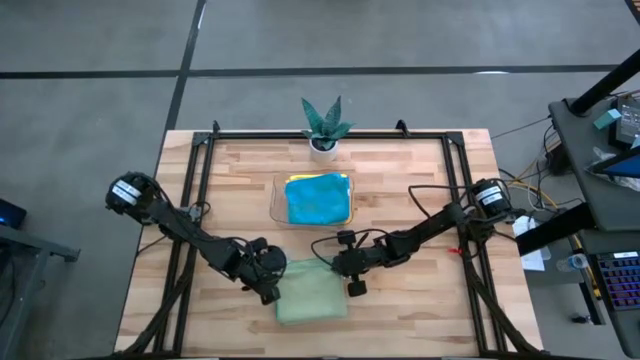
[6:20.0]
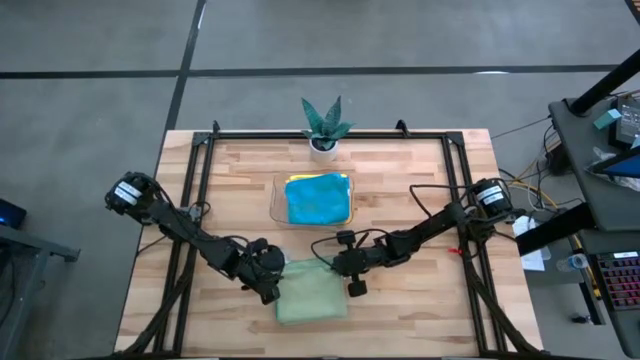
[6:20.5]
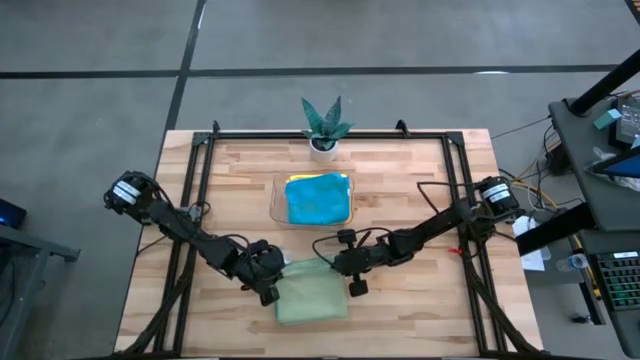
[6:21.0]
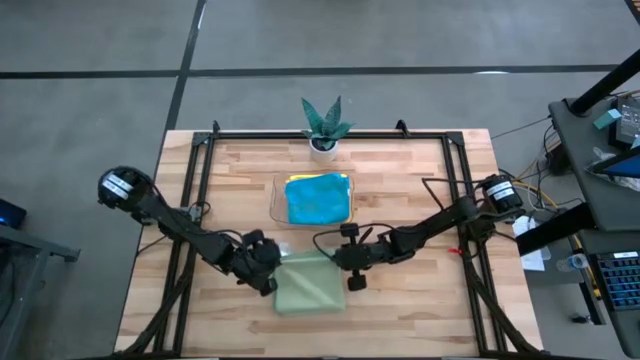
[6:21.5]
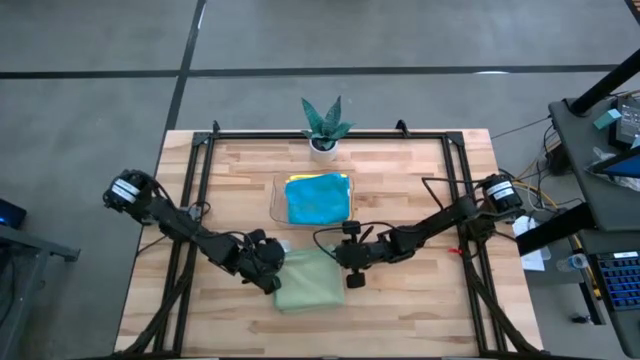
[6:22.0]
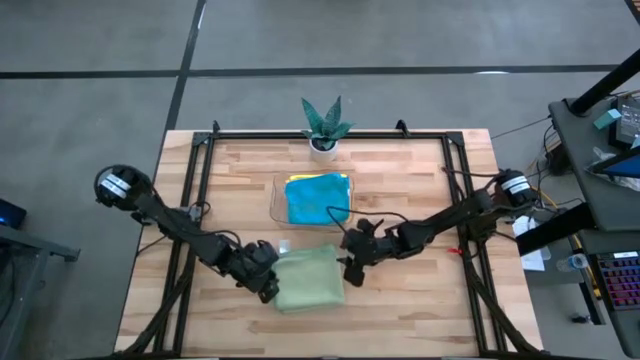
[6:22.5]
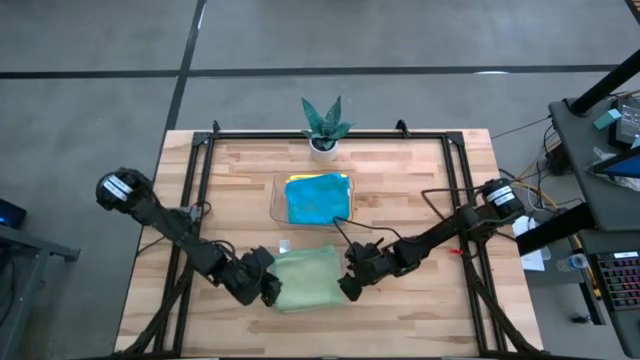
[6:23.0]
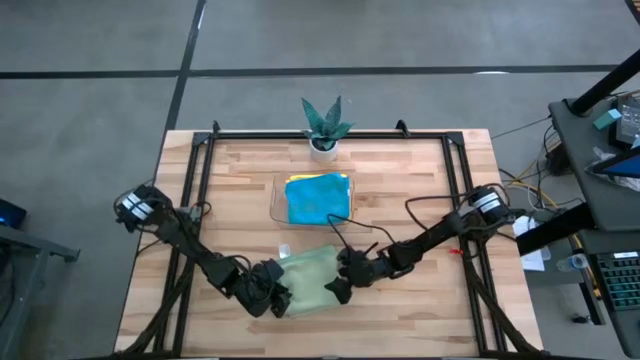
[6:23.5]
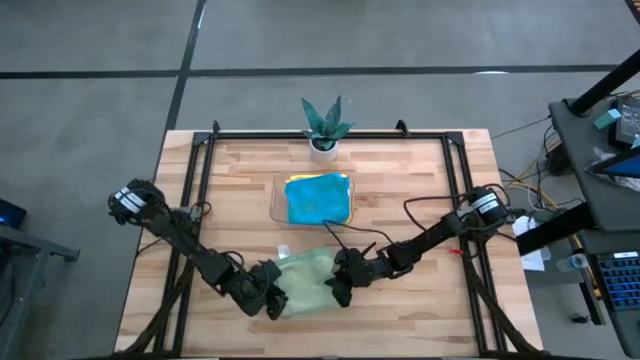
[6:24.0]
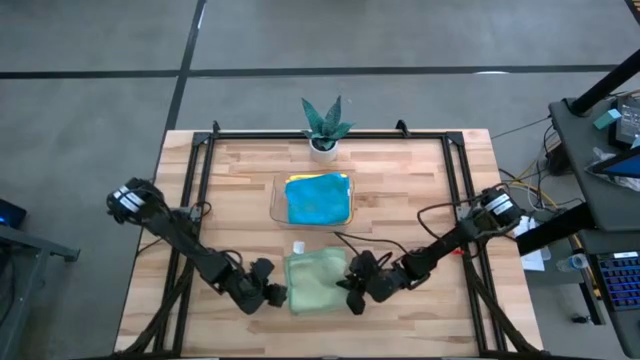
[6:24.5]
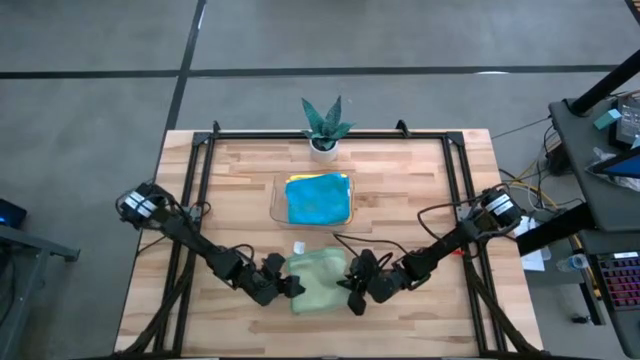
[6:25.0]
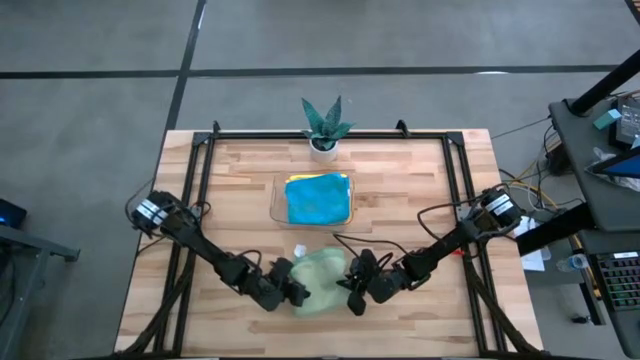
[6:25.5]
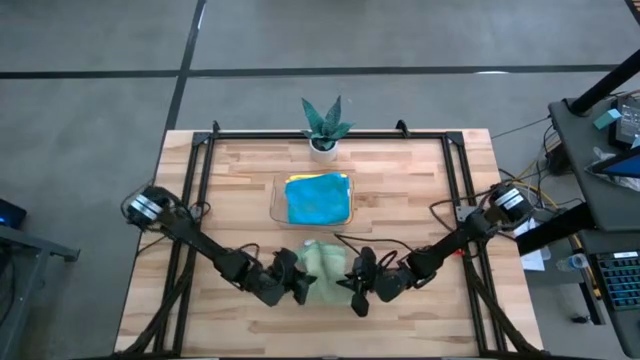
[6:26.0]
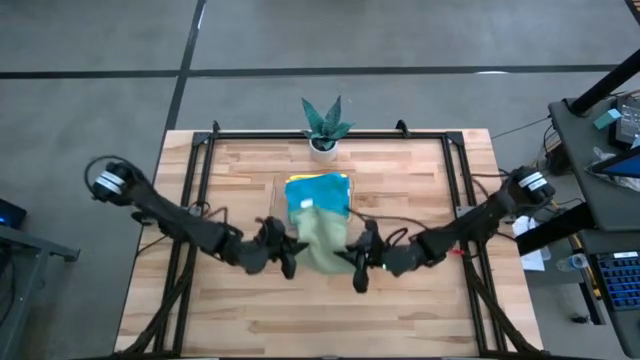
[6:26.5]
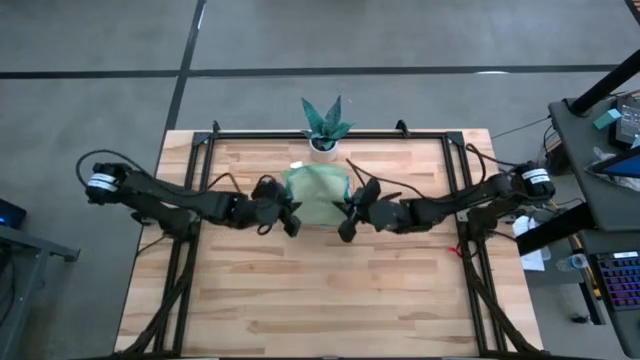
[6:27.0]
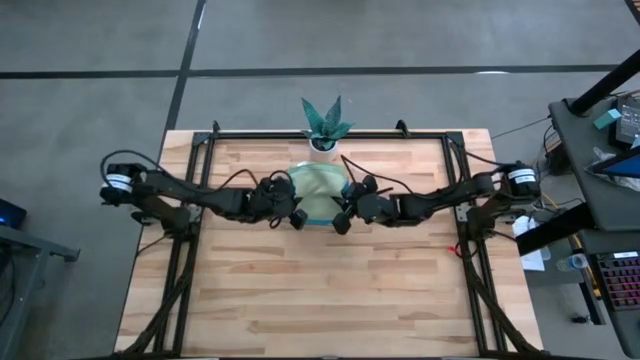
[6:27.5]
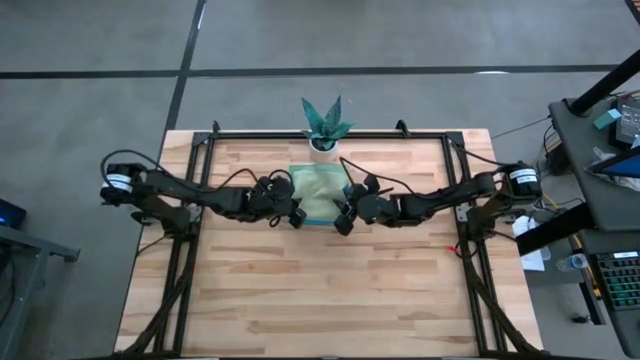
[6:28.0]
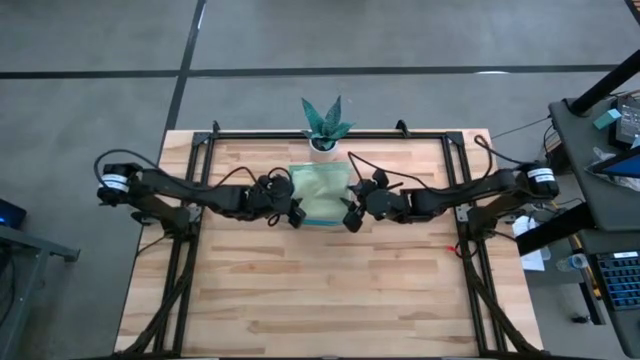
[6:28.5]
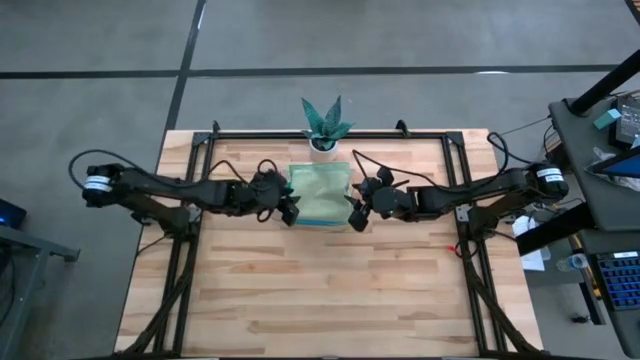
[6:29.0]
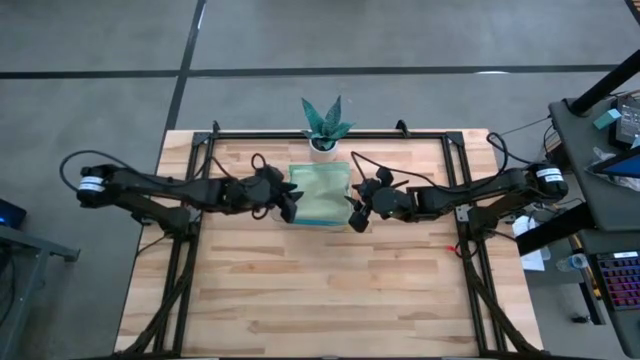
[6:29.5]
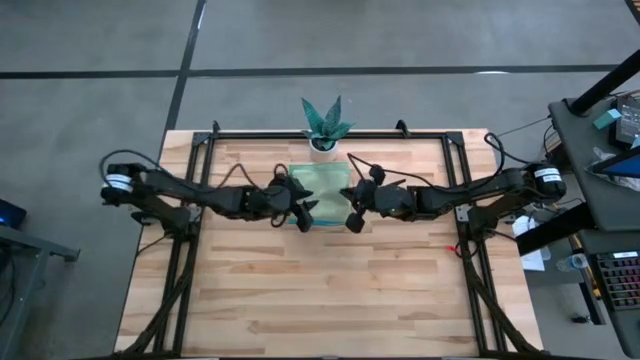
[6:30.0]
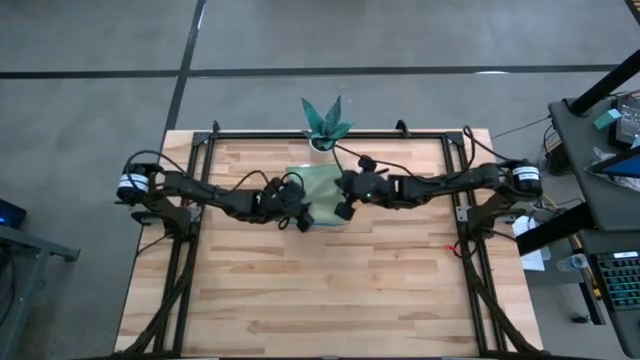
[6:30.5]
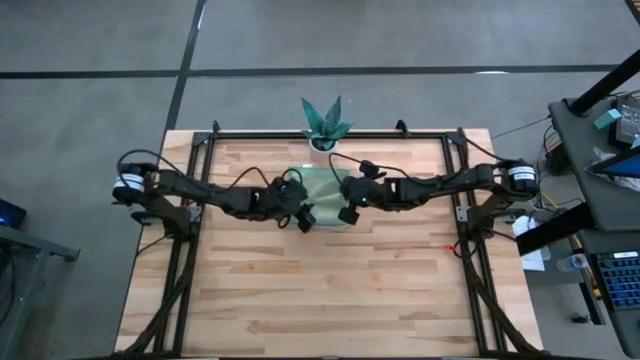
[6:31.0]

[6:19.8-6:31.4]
Task: Fold microfiber towels
Put the folded green microfiber towel into the transparent bin

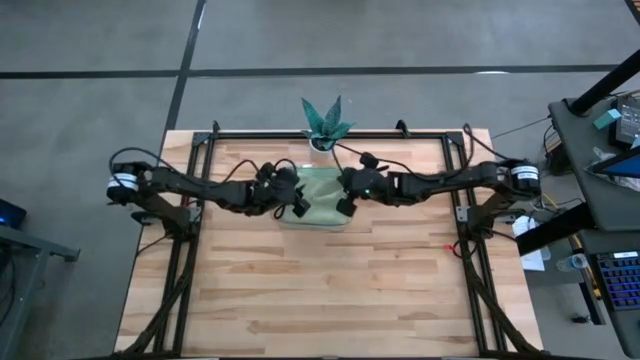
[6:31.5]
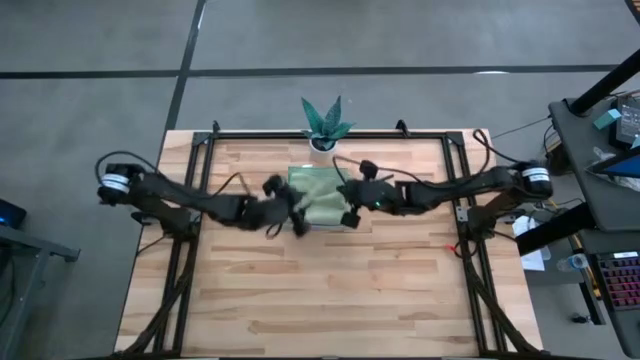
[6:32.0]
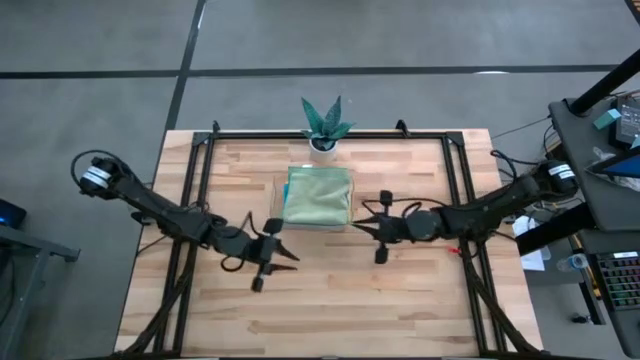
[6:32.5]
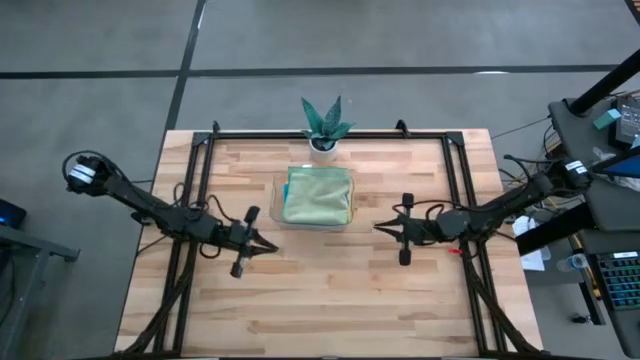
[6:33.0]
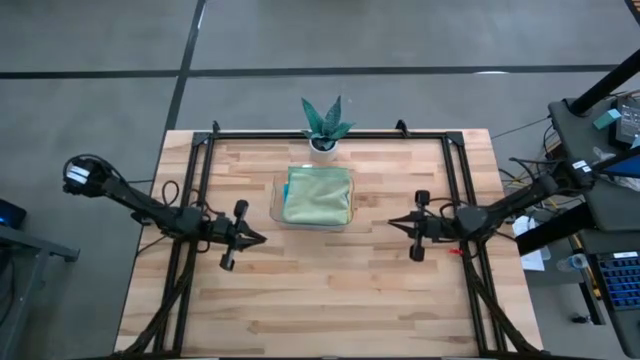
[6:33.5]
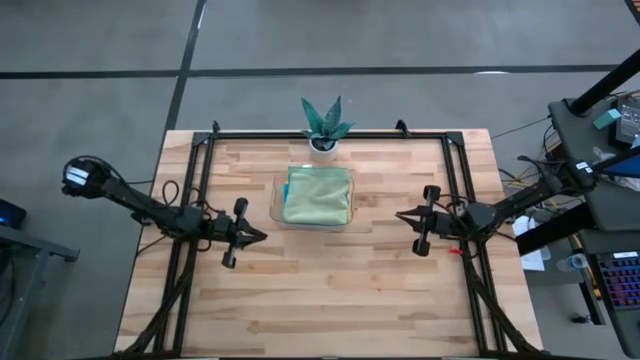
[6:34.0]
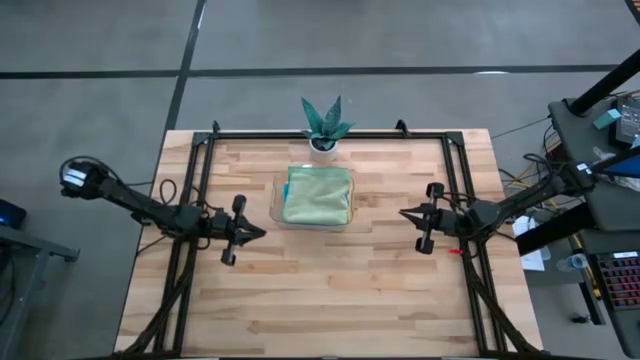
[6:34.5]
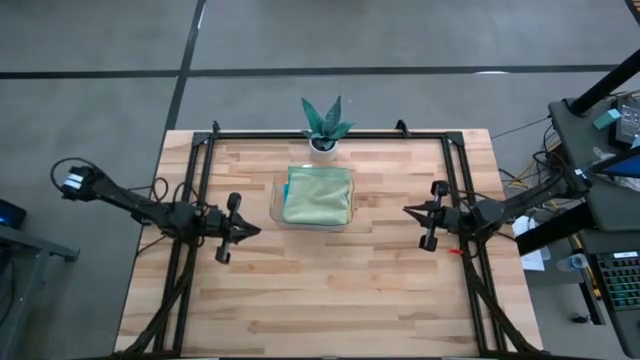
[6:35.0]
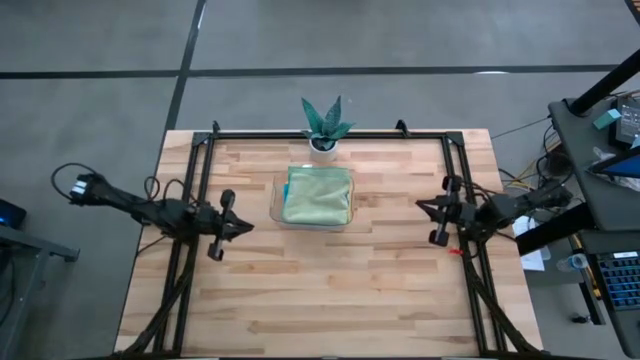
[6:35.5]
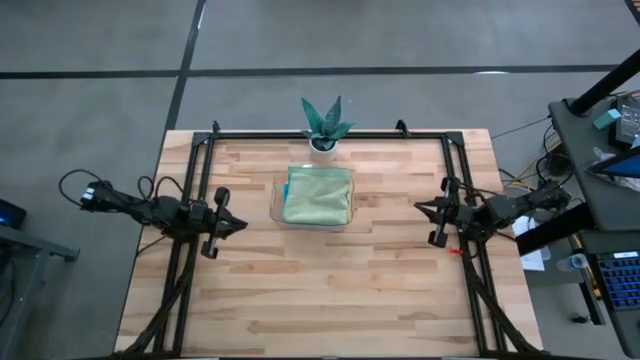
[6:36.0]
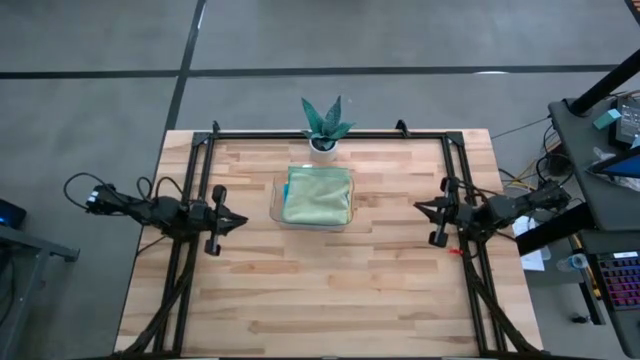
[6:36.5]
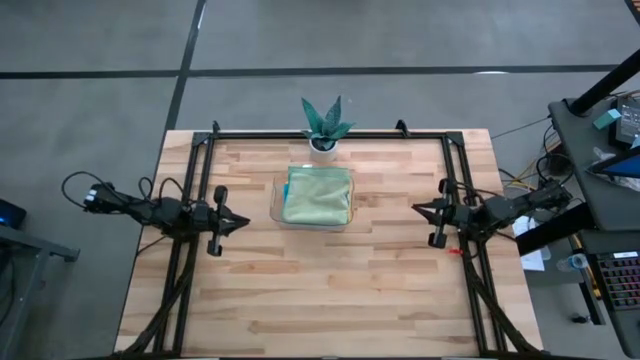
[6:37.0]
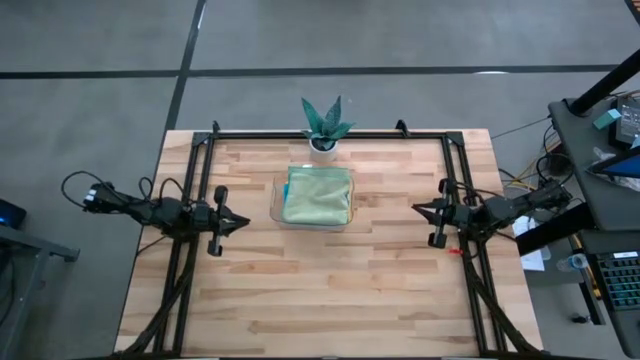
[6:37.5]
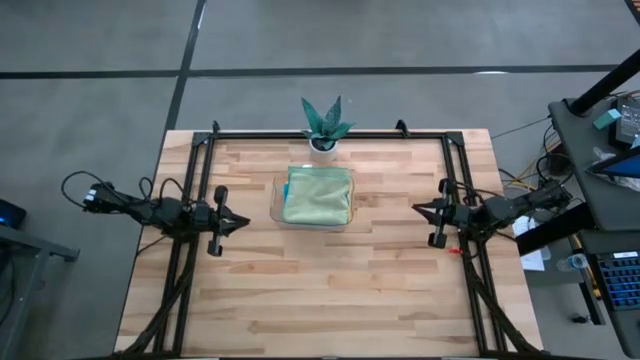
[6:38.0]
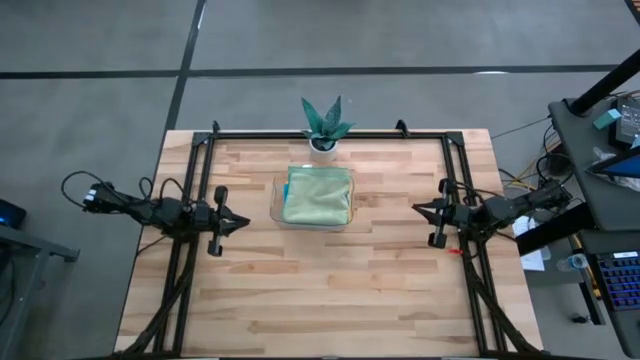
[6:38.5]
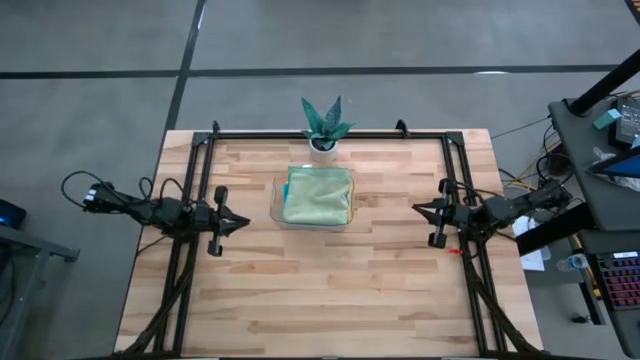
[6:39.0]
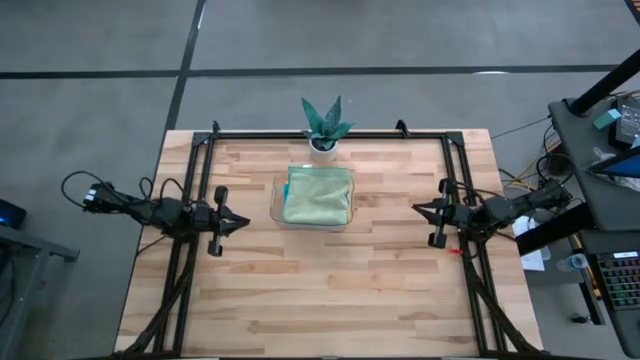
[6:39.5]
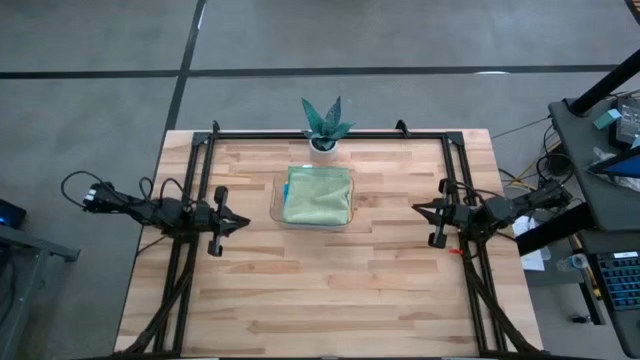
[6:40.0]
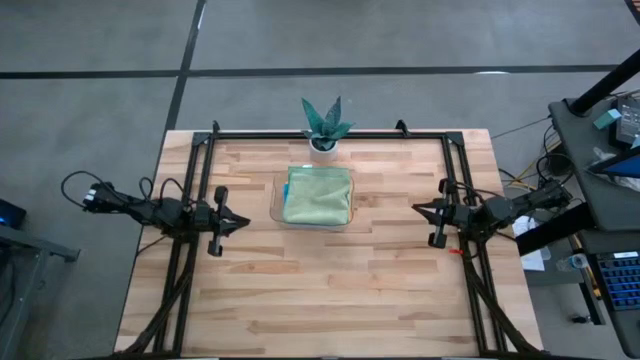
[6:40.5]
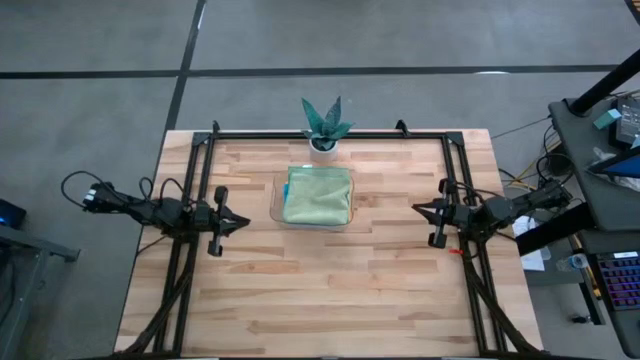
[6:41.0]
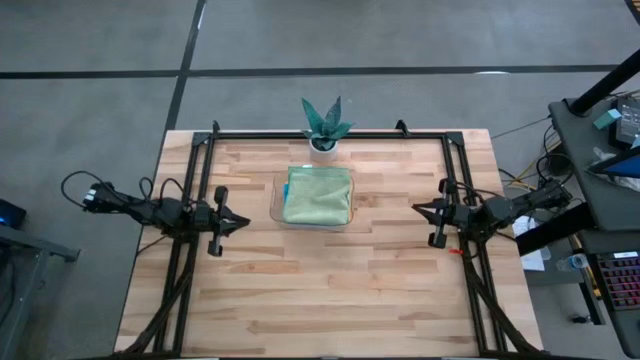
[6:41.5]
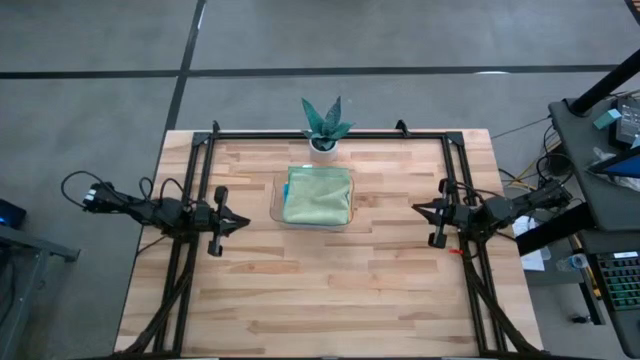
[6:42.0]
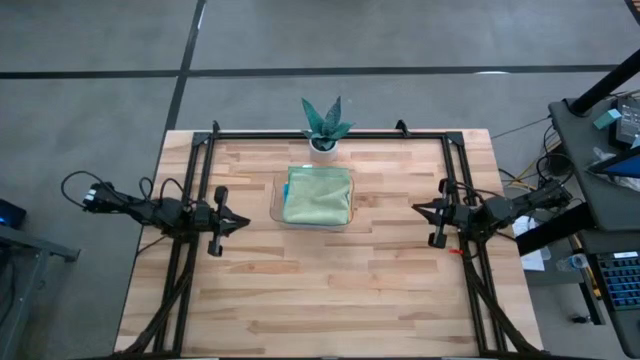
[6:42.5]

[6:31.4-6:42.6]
Return to Home Position
